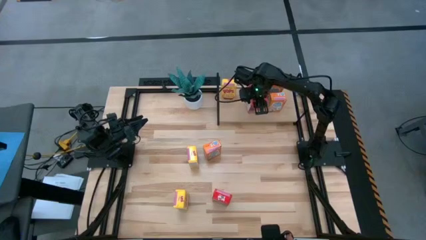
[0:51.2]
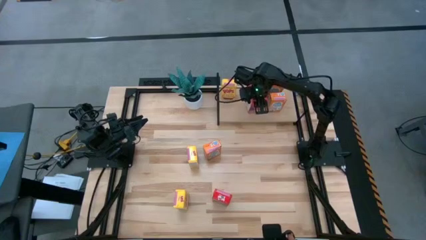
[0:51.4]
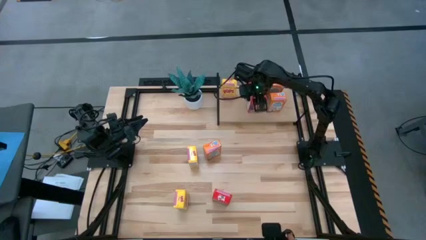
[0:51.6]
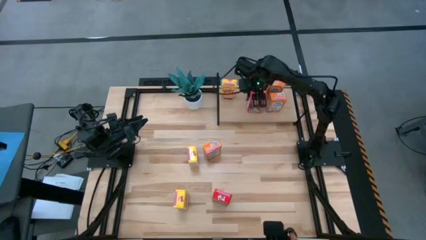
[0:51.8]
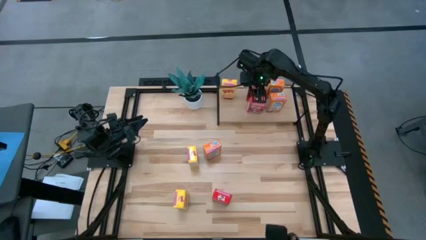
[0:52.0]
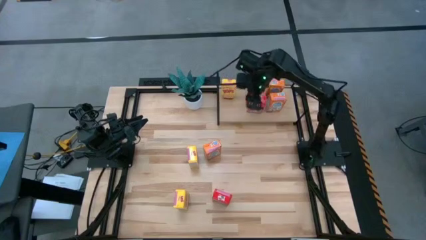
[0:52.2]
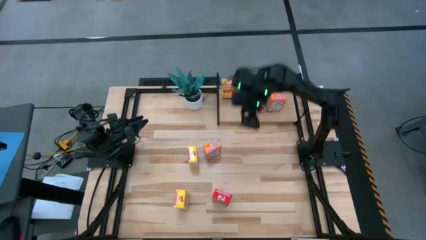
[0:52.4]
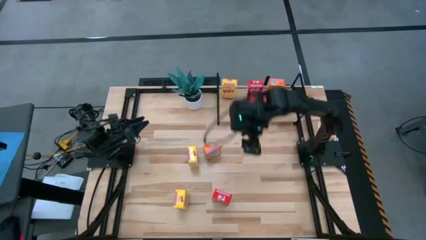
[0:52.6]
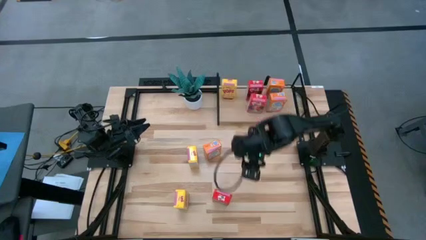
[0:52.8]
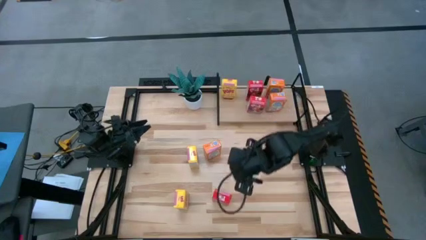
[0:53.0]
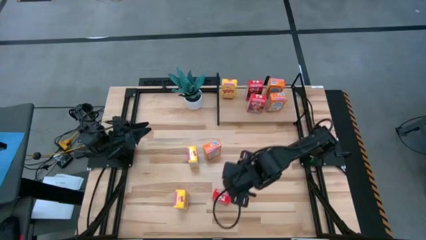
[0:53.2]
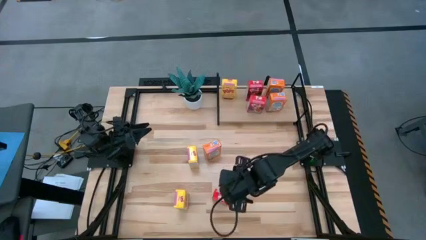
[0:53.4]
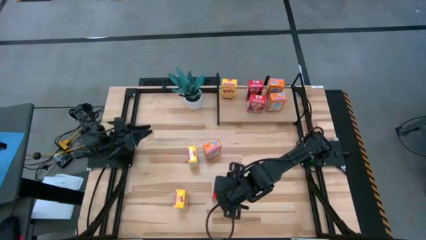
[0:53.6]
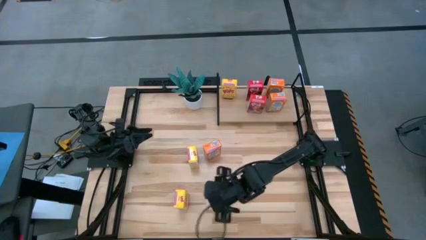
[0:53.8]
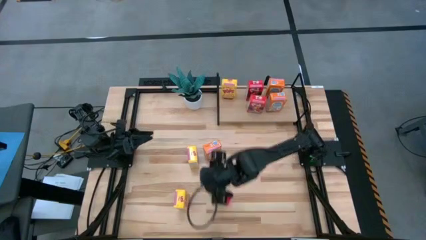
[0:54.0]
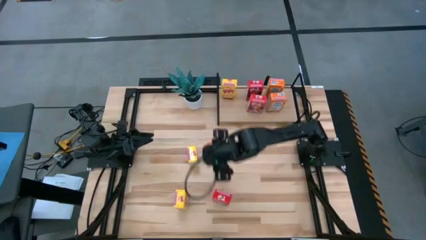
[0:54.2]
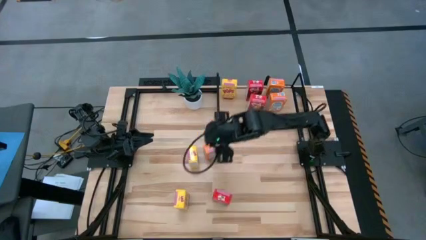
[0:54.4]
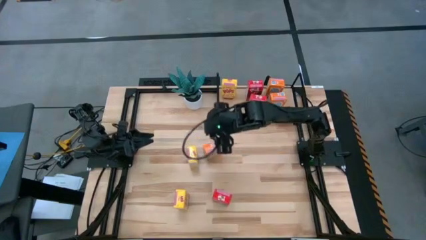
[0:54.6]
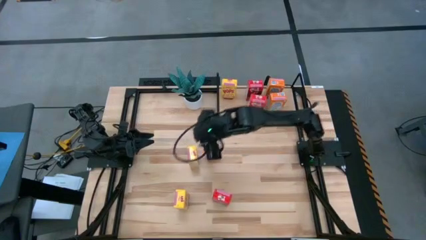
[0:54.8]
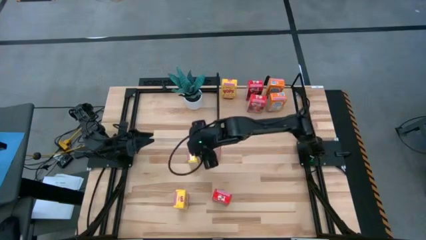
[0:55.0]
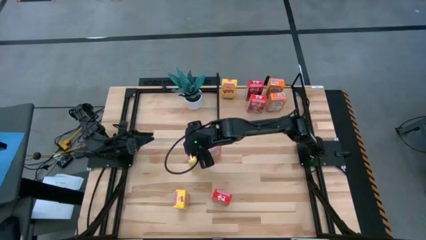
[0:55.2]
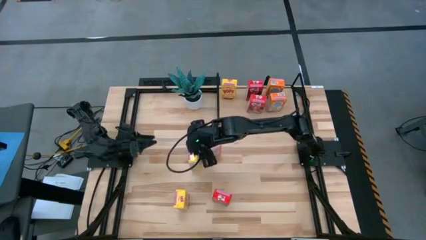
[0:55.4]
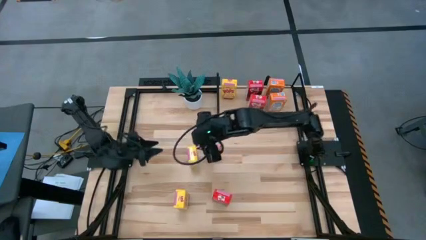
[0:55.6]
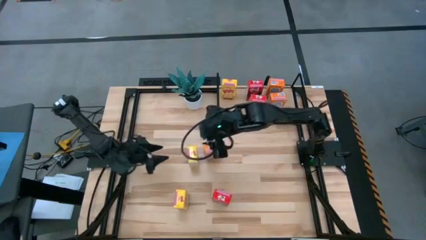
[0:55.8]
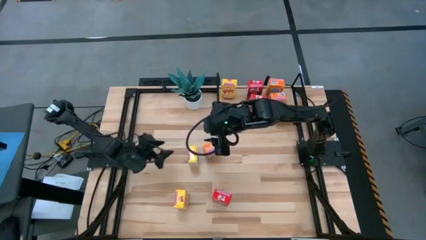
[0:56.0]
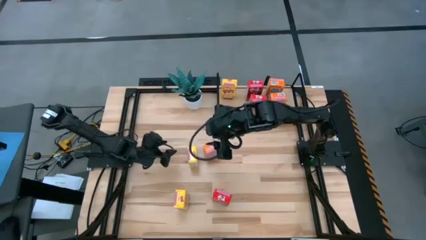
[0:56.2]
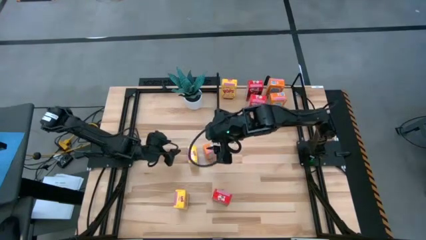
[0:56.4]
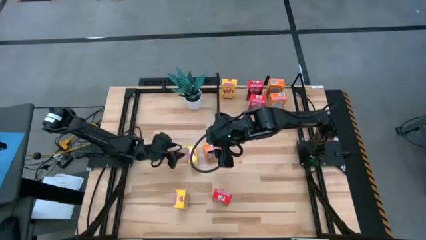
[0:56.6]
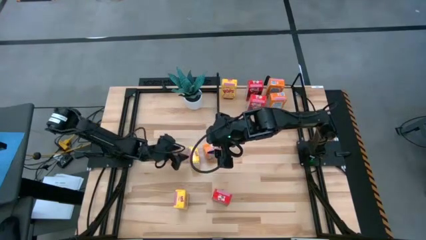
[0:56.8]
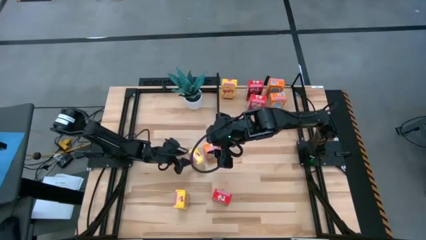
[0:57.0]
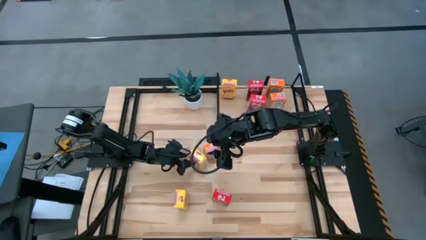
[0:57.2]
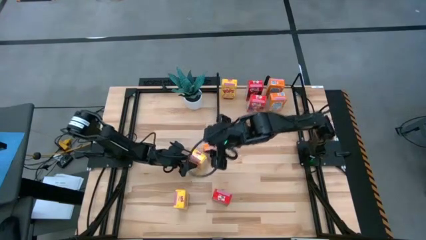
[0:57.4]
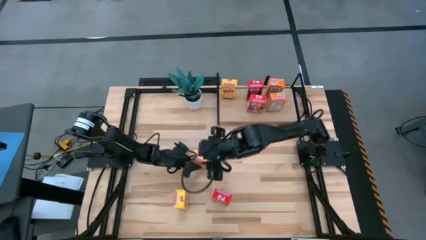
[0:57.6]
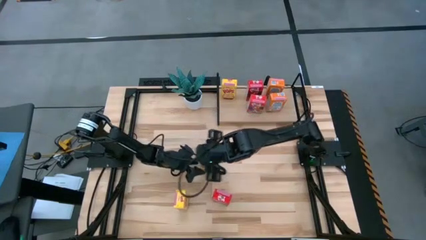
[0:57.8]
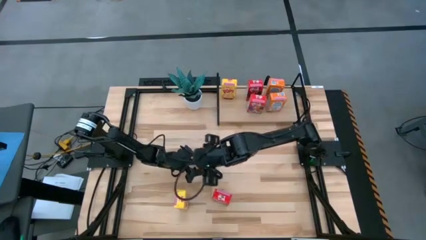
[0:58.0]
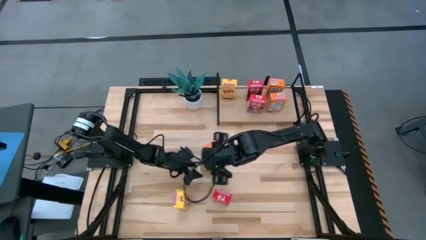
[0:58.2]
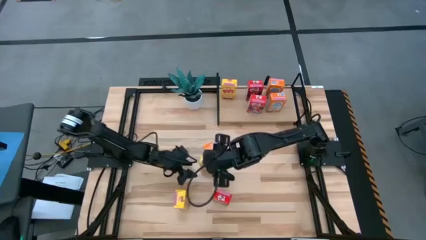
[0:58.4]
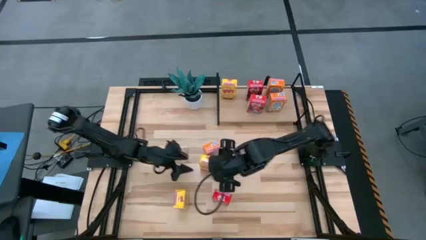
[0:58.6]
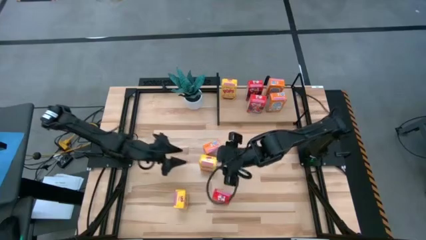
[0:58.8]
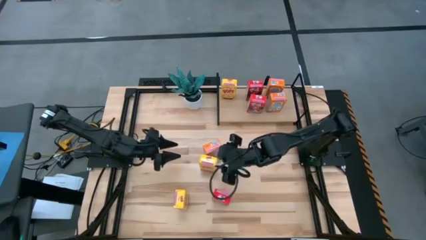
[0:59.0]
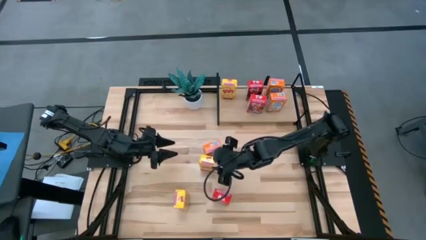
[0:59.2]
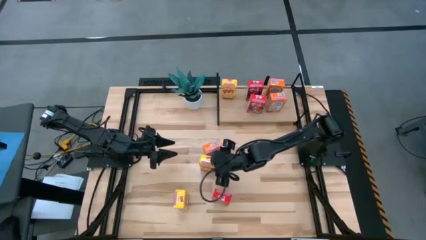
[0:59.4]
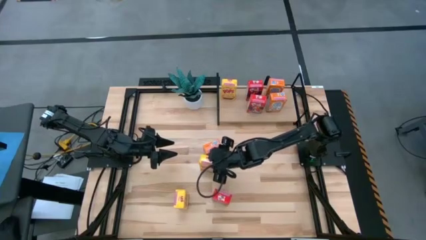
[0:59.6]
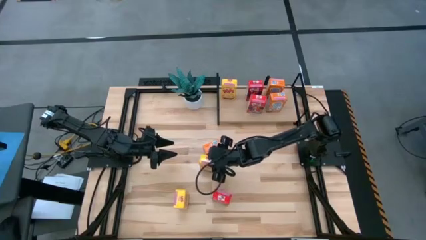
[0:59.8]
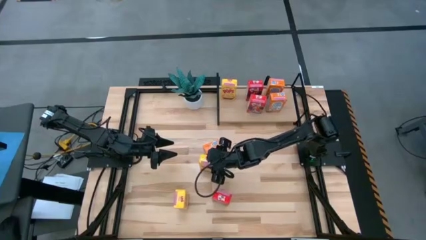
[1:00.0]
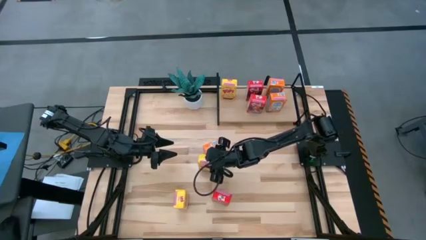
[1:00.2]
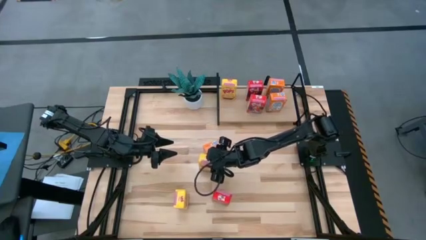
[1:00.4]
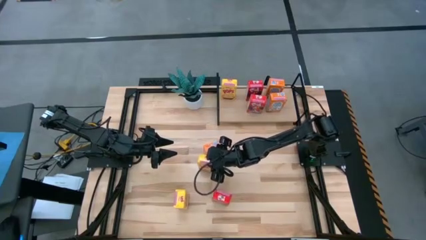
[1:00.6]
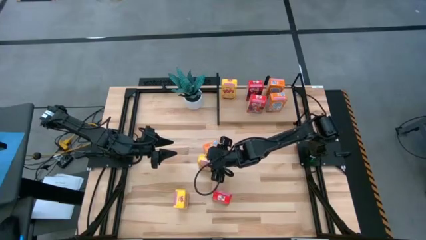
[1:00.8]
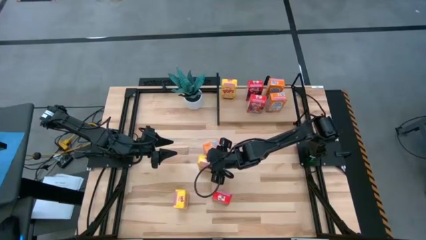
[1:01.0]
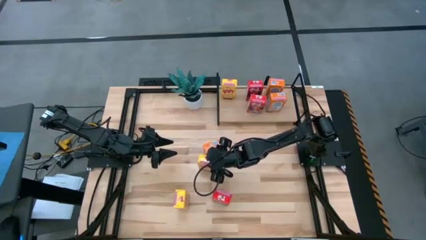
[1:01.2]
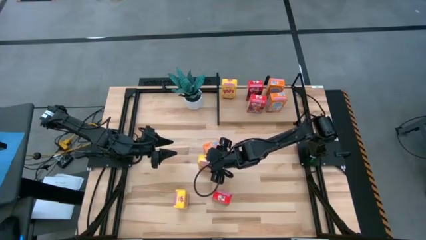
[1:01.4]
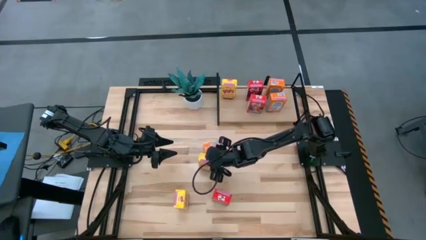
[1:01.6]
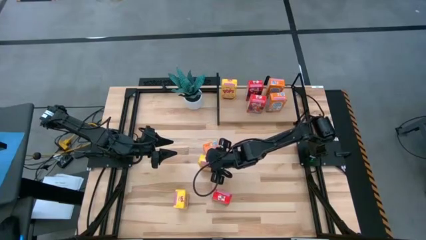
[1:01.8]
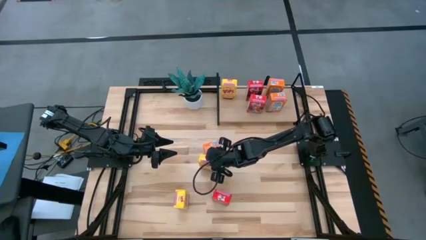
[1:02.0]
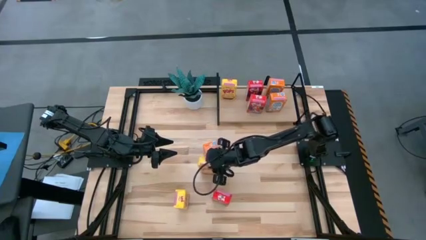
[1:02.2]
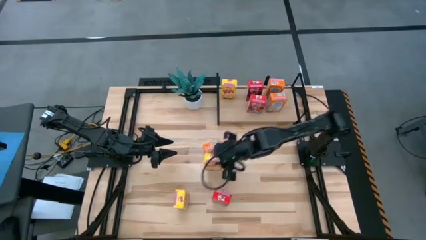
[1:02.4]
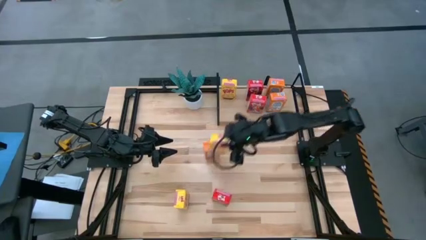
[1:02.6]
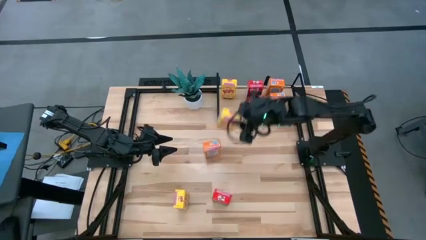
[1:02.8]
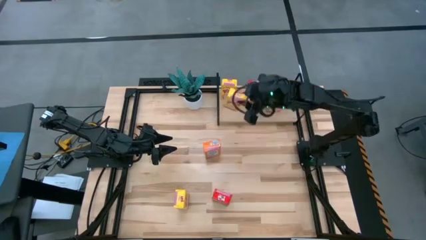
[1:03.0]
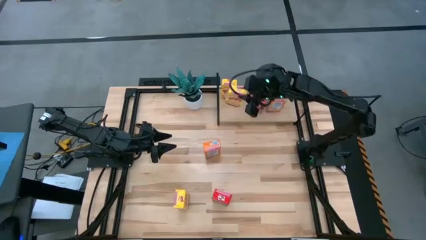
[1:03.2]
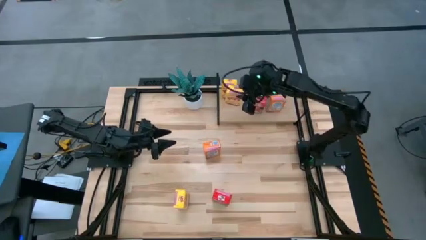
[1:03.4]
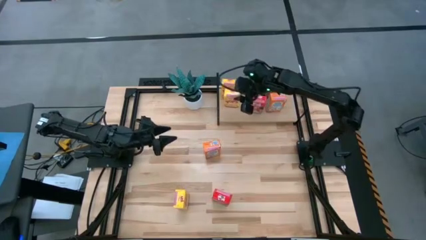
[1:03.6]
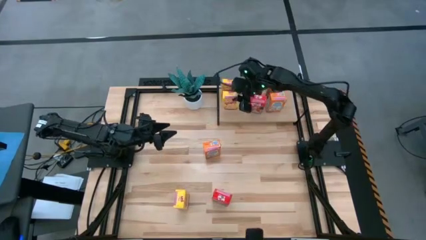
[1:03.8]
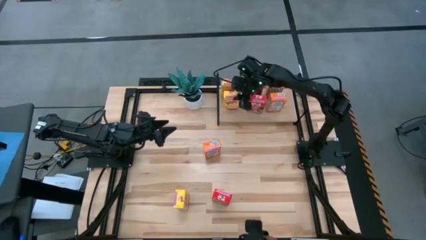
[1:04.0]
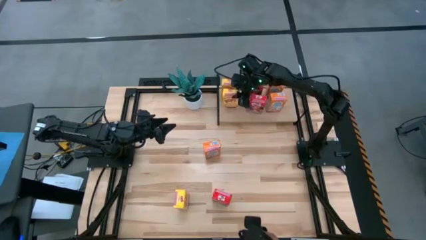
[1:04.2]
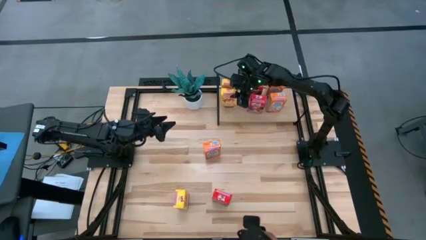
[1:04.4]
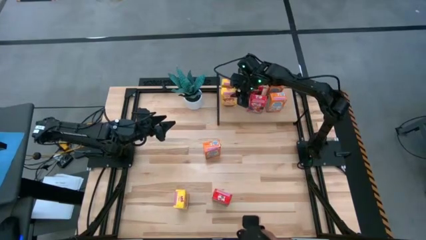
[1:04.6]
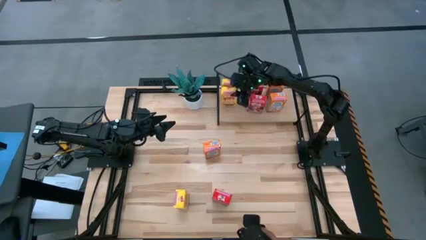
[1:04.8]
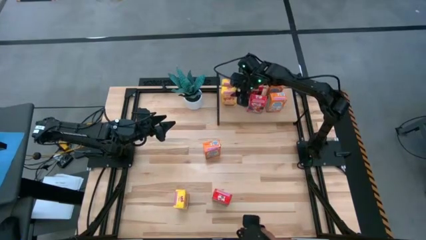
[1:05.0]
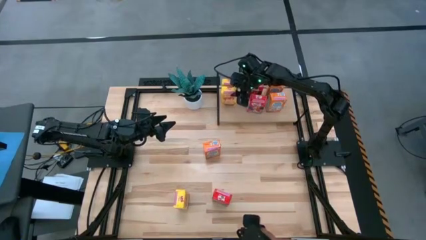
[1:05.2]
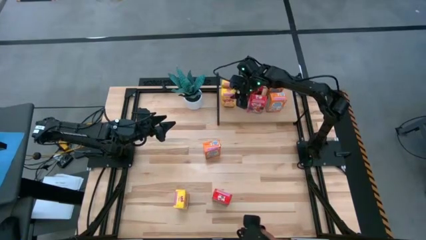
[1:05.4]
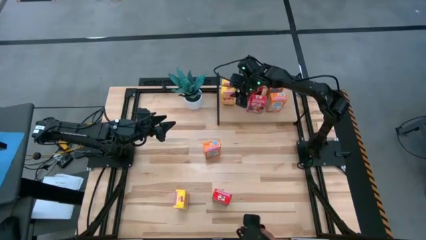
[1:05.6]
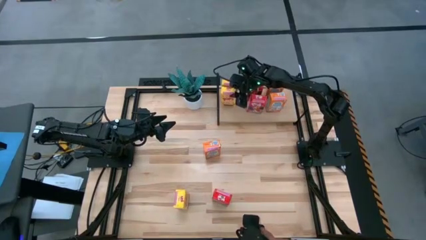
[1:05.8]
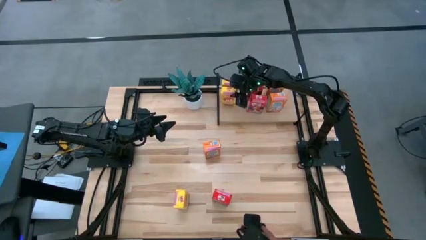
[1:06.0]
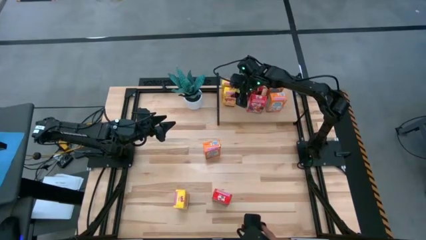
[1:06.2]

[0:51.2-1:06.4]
Task: Stack cereal on shelf
Put the top yellow cereal box on the shelf aligned with the yellow cereal box

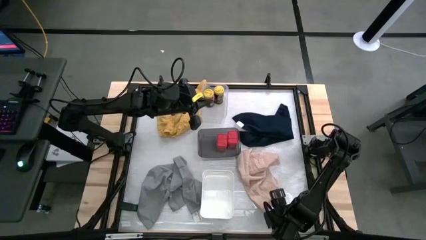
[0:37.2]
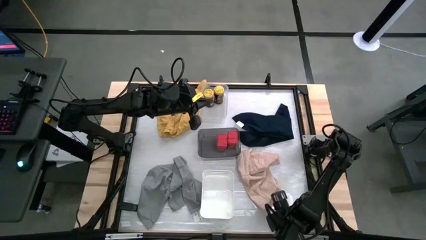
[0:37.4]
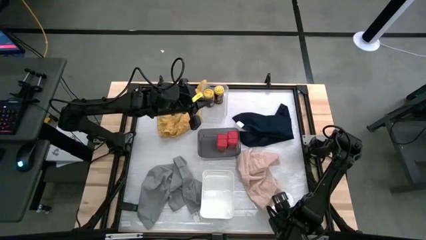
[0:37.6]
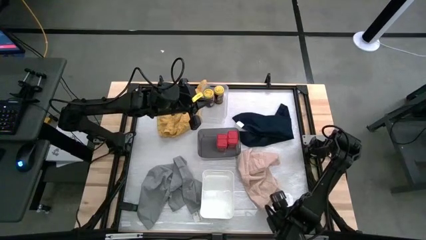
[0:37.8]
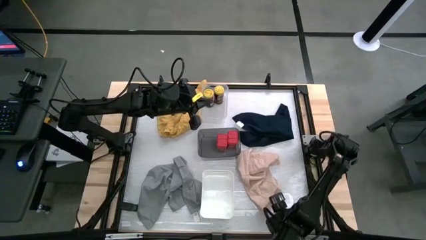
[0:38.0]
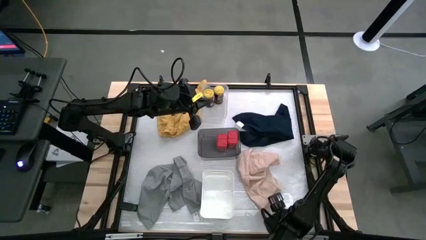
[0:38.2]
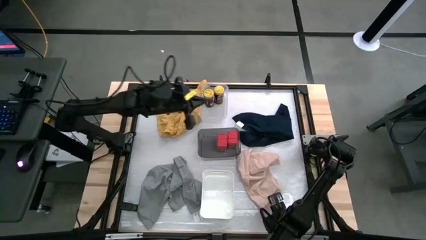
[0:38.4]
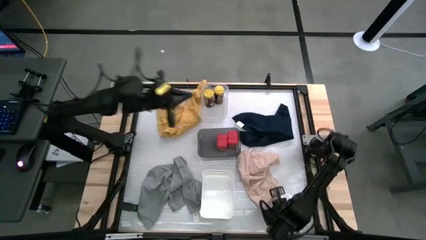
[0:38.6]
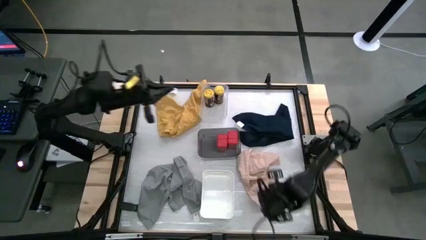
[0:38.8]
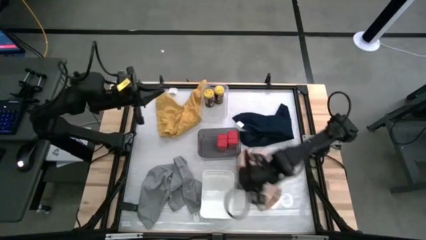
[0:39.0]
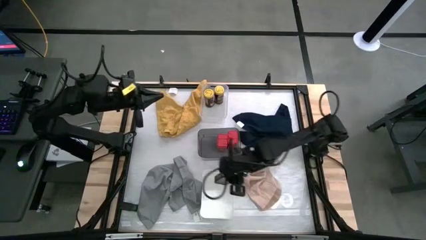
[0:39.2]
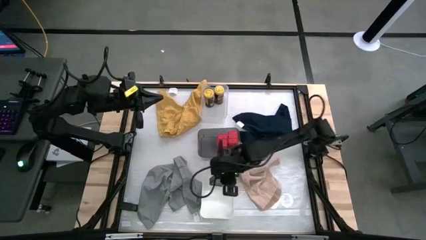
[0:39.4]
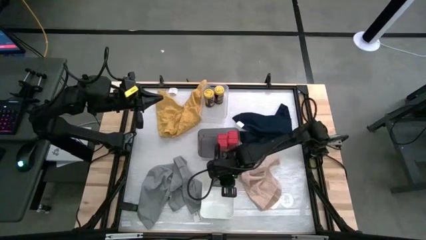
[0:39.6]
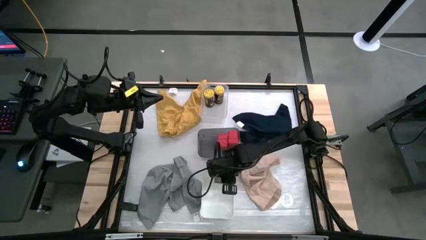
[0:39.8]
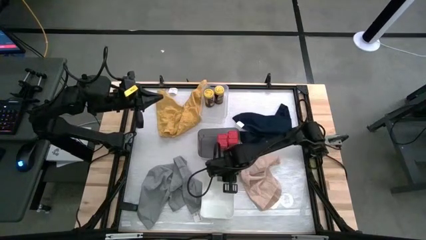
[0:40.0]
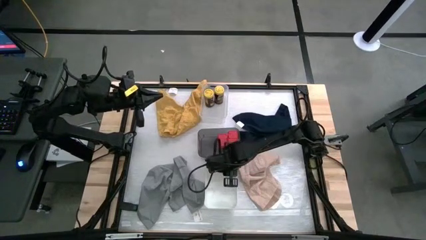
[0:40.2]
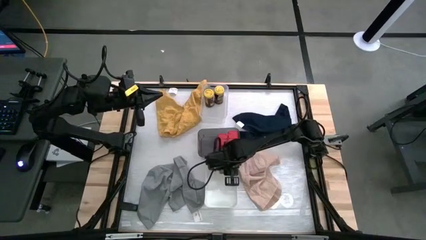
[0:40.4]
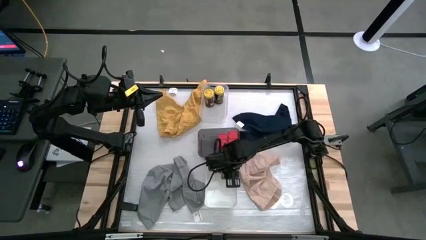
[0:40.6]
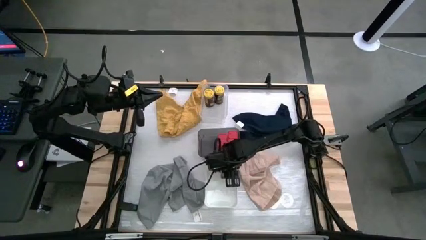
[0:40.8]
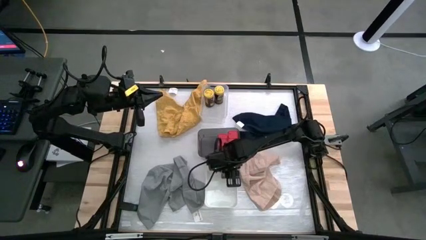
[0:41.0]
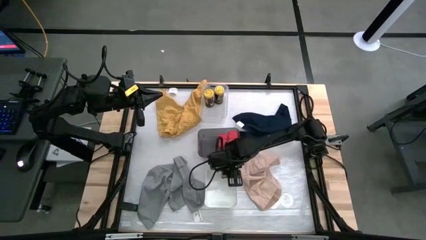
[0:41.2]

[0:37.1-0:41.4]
Task: Sort spices by type
Put the right black spice can into the white bin
